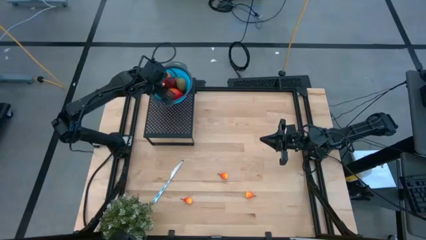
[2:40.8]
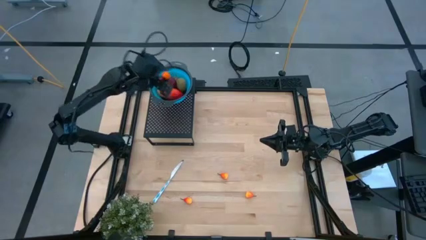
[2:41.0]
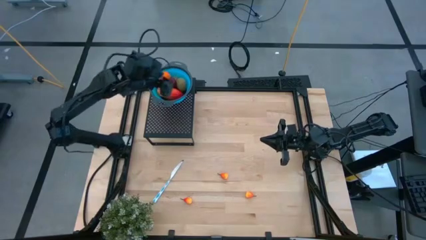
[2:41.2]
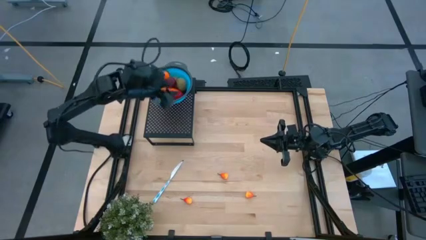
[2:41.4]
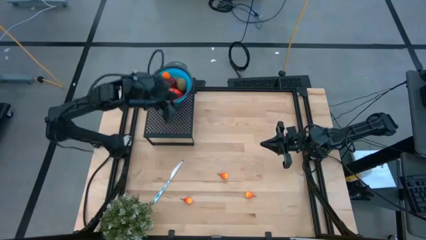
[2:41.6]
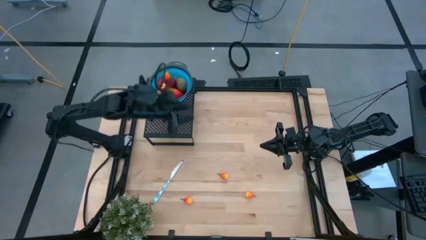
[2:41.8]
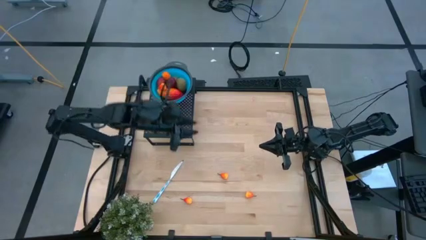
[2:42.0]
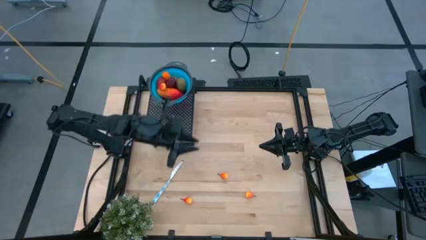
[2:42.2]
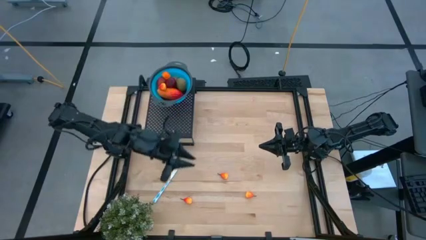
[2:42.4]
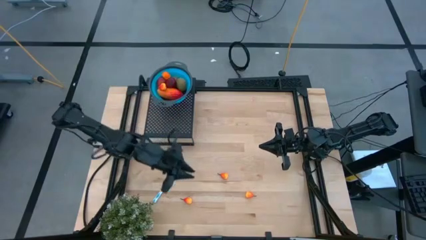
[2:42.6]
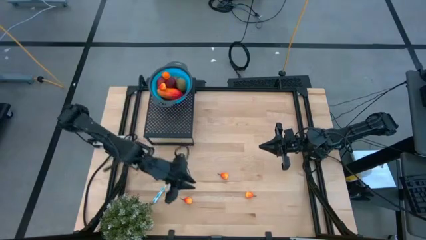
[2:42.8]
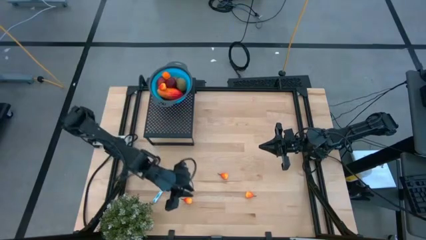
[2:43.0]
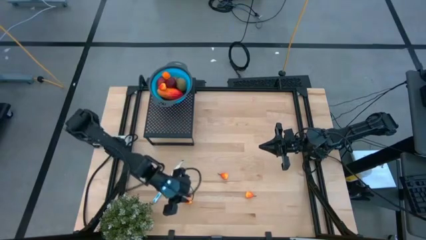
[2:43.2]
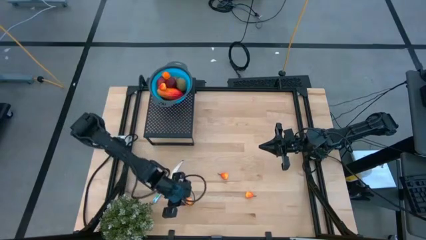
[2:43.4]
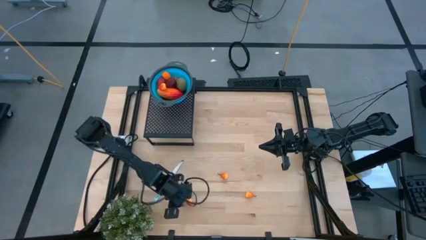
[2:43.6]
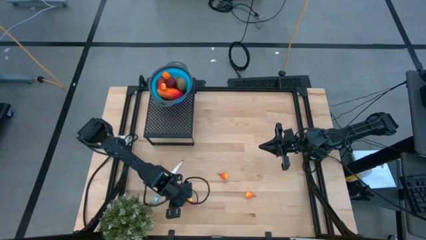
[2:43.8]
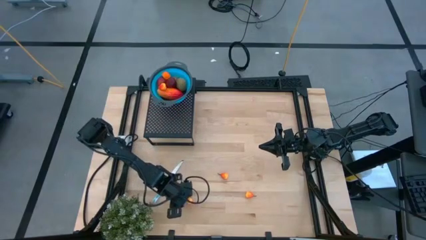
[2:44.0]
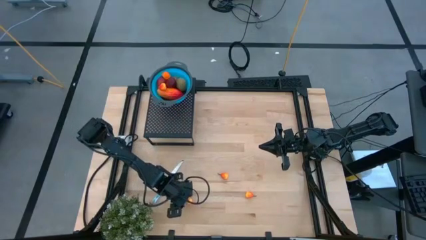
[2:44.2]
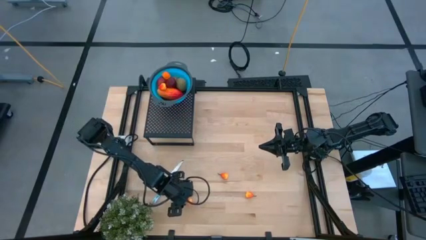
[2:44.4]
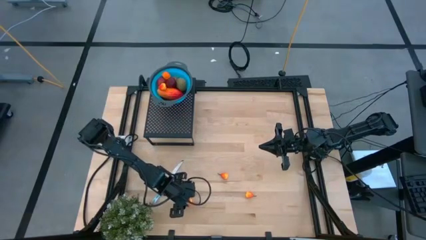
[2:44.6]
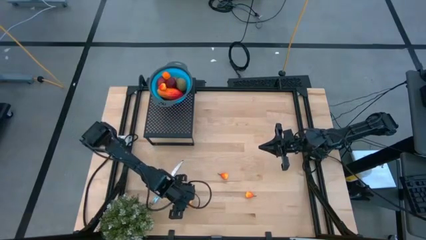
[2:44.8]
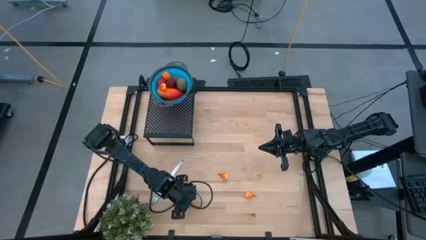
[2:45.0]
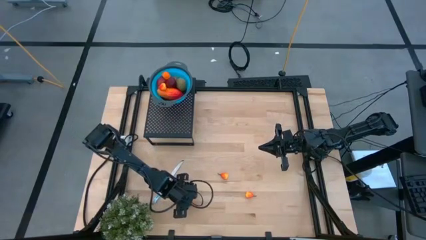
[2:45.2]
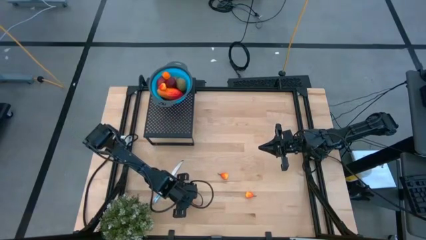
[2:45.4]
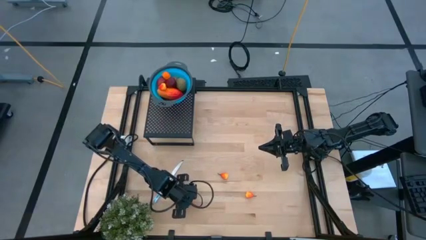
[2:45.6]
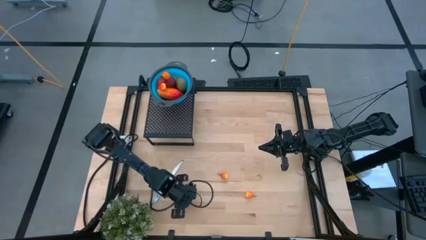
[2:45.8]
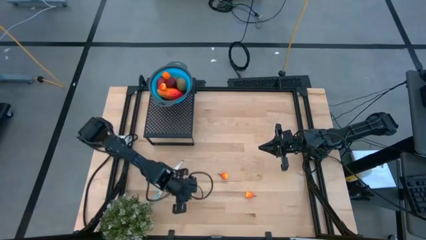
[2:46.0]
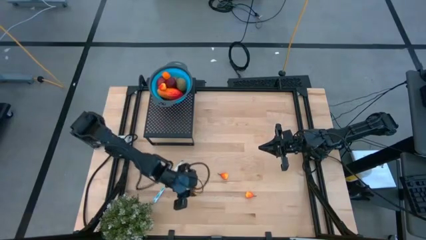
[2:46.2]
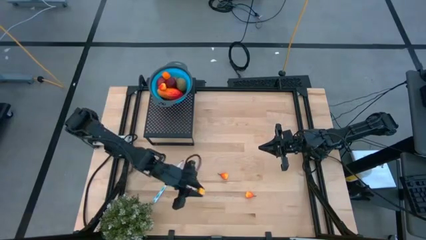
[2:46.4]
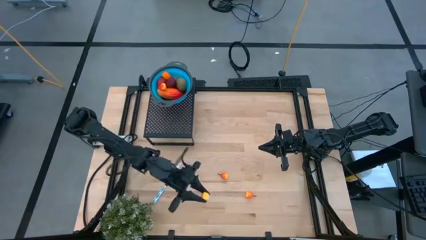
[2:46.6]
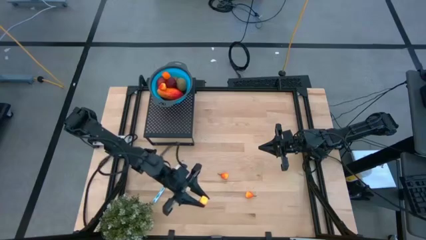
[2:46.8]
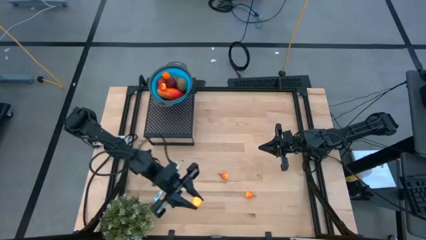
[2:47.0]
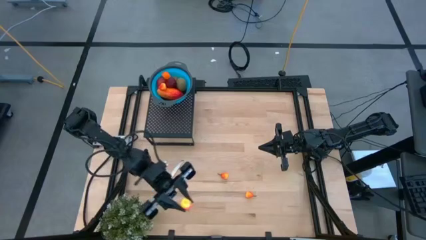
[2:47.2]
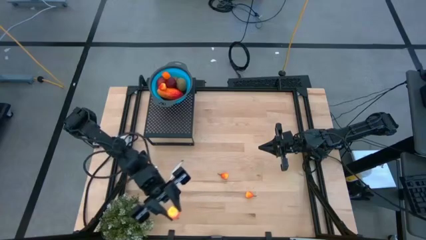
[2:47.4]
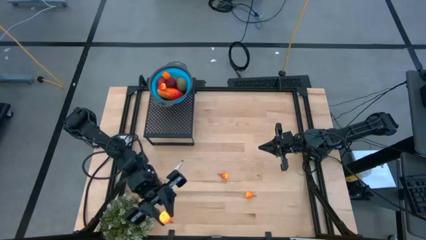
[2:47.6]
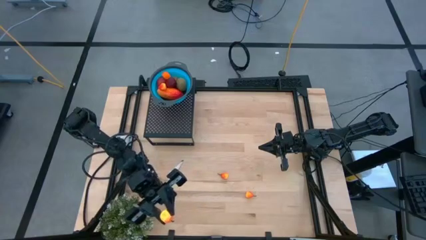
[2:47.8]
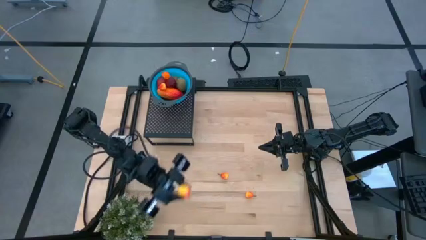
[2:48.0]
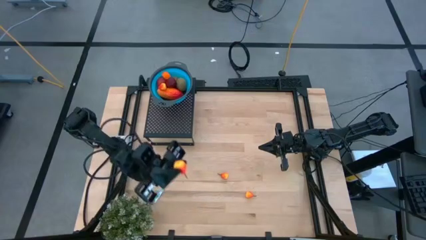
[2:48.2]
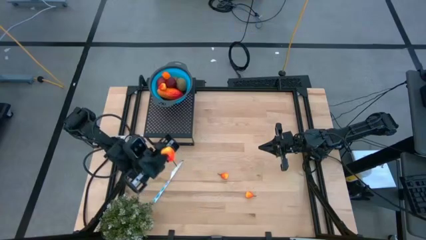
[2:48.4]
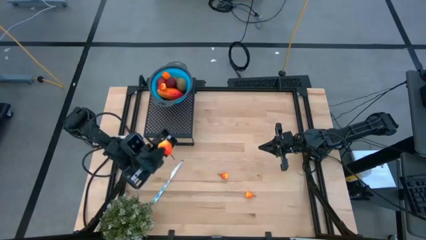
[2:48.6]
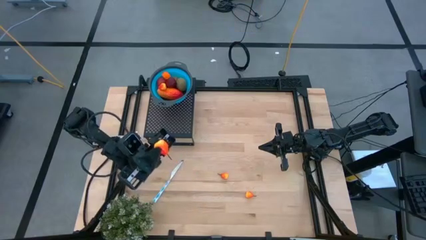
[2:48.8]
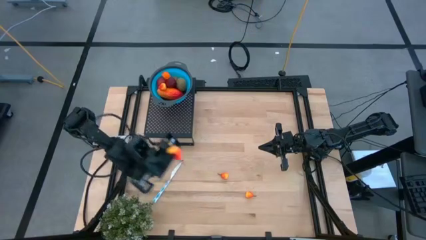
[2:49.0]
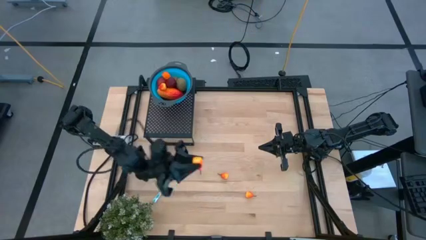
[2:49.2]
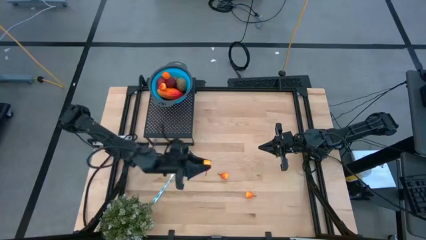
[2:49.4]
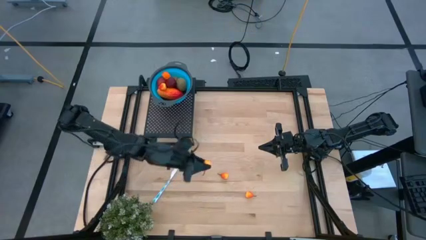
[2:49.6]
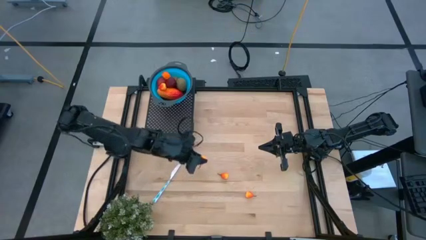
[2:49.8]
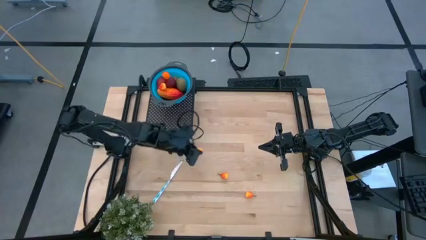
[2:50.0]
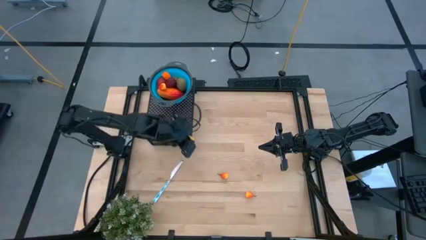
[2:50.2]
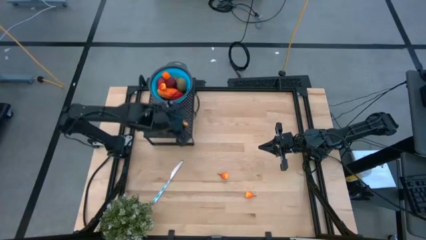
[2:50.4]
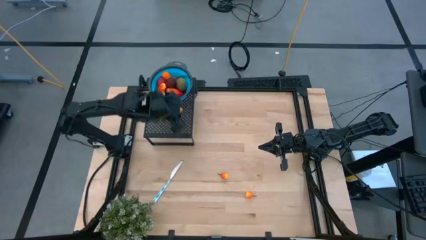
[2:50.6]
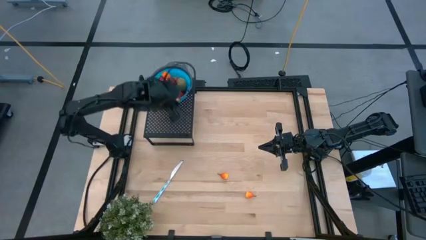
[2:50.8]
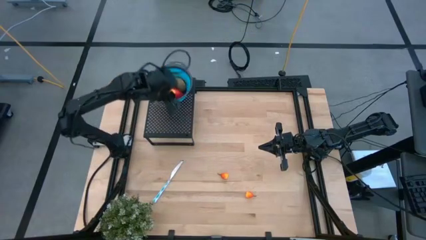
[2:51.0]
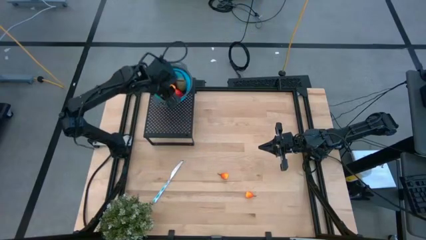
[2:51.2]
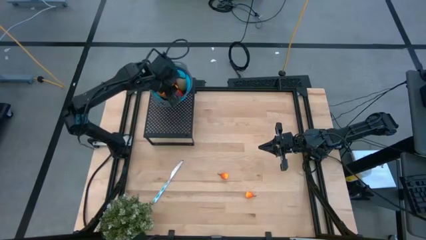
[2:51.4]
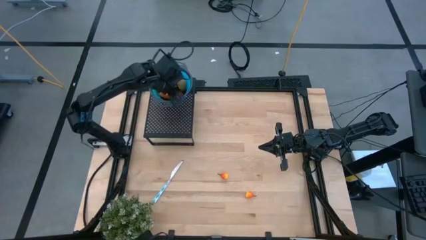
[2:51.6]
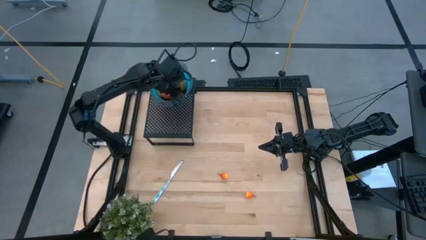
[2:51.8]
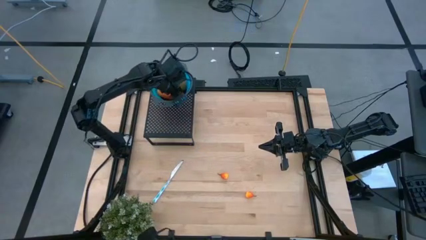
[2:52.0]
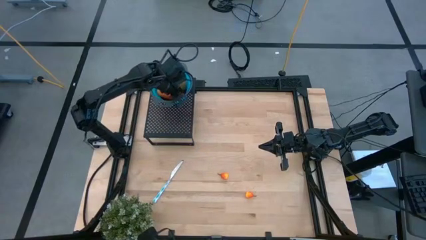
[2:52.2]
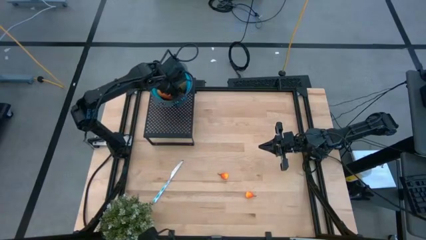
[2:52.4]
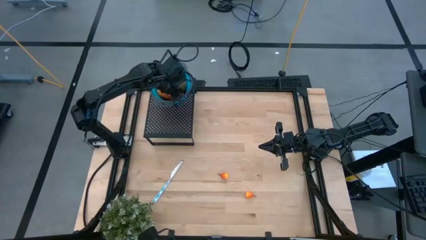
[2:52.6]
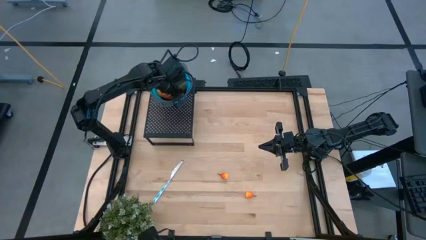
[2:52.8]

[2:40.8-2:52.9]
Task: Pick & Place Fruit
Put the orange pear into the blue strainer bowl on the shelf

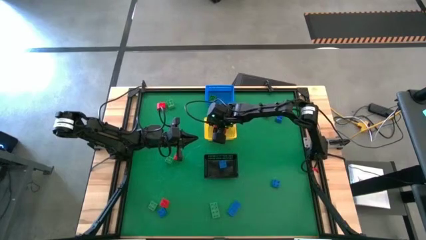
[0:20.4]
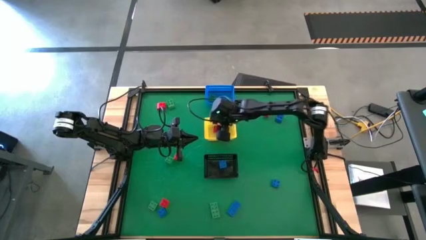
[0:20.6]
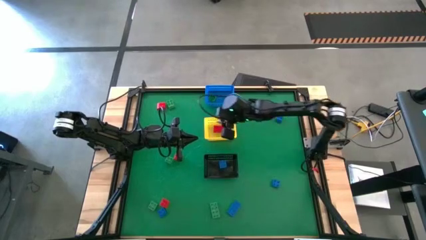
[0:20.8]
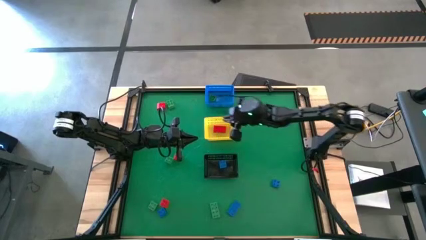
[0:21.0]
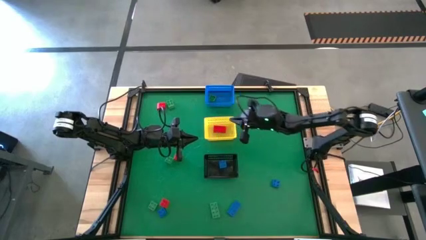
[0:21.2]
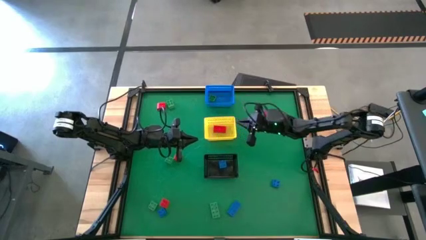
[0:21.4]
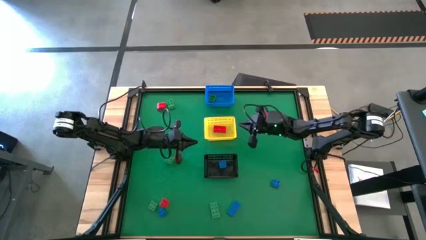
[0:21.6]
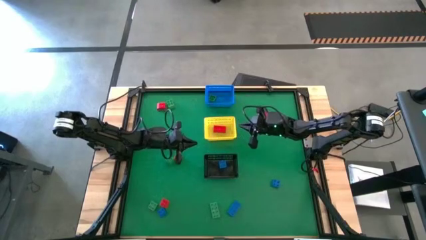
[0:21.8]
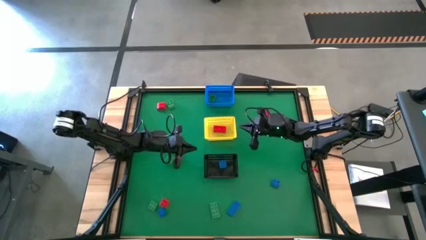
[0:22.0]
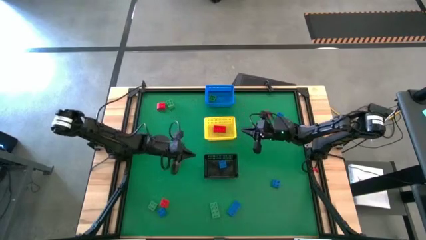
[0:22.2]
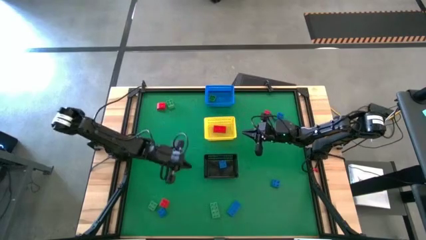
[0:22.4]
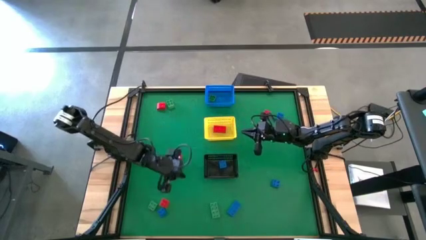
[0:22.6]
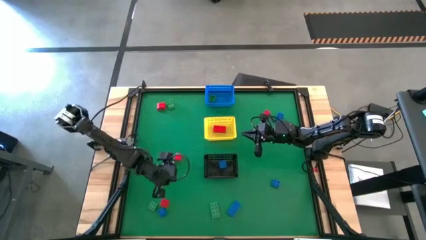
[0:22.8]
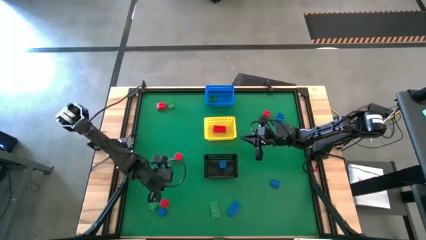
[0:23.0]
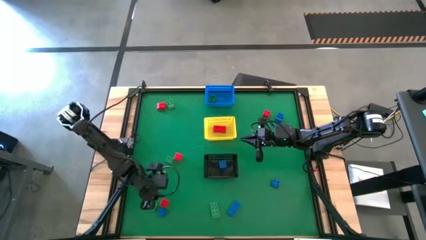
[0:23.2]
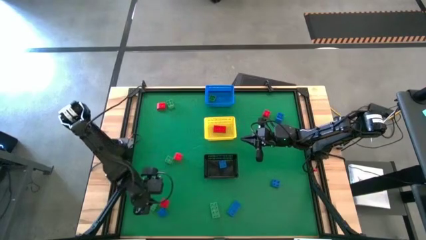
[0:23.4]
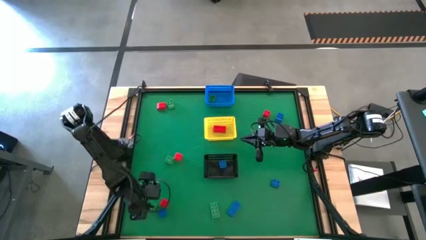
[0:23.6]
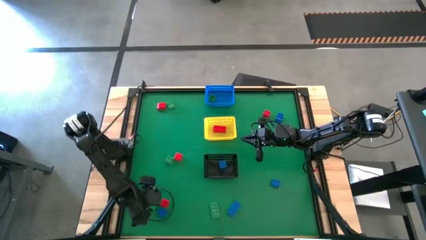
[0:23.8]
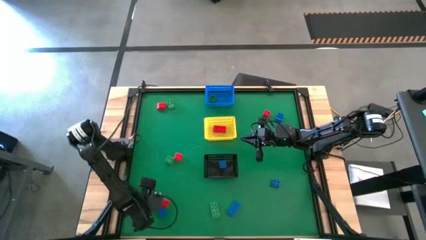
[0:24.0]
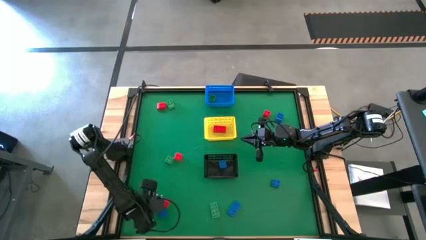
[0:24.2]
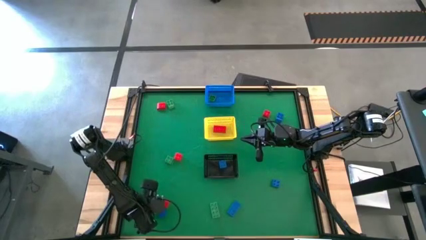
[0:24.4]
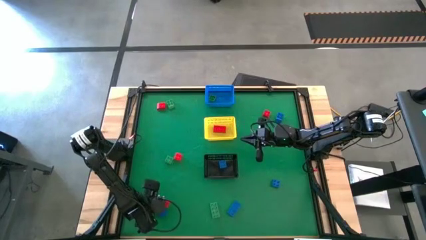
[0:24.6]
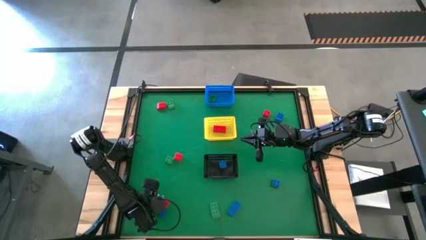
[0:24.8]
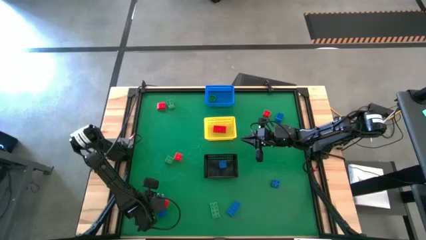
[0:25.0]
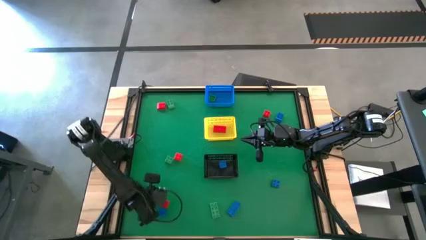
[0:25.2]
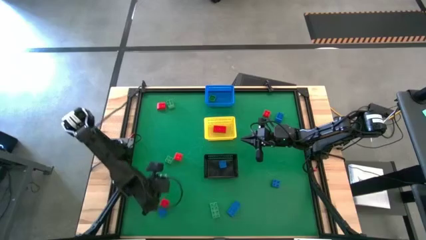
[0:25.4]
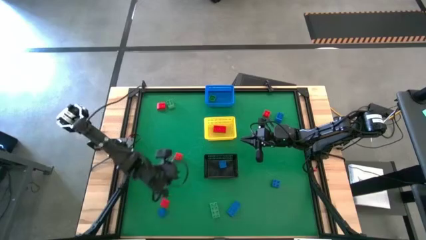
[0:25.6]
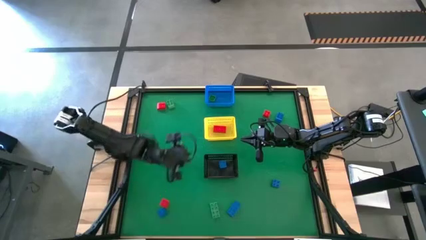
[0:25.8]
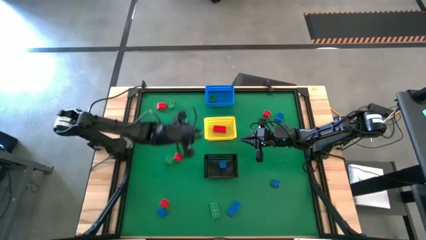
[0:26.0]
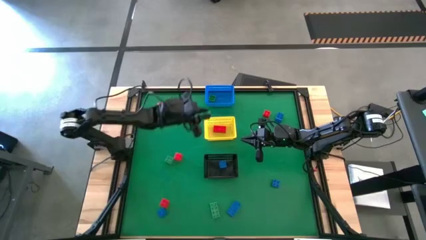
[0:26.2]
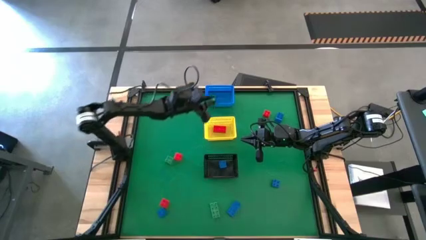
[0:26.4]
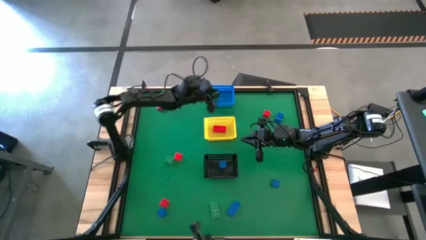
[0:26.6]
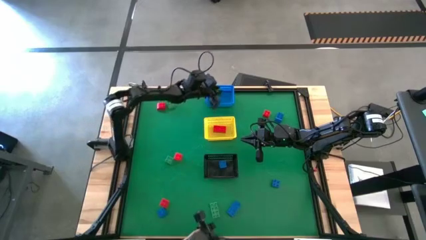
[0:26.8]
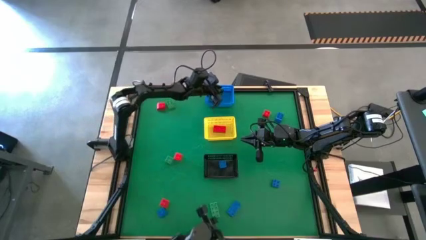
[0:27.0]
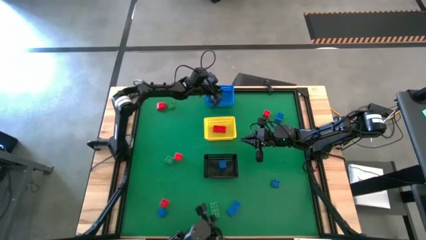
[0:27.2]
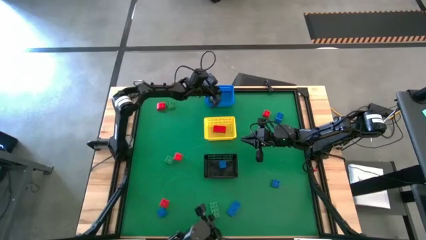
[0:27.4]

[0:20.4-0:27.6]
Task: Sort & place blocks by color
Put the green game piece into the blue bin
